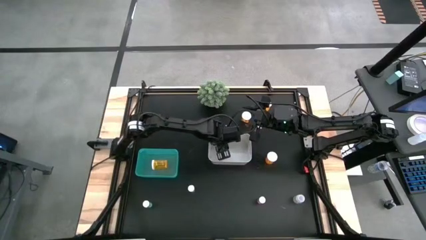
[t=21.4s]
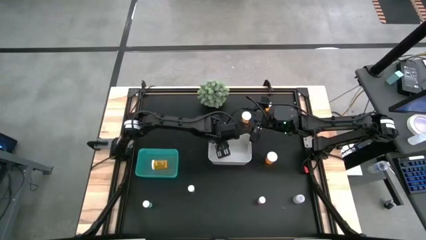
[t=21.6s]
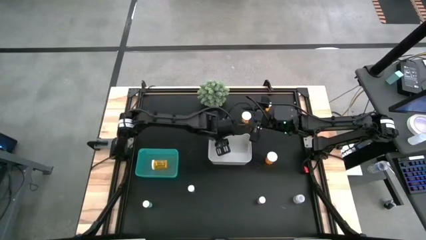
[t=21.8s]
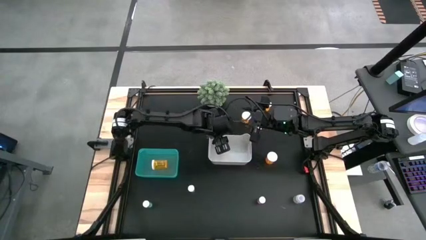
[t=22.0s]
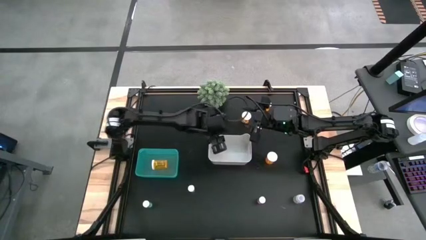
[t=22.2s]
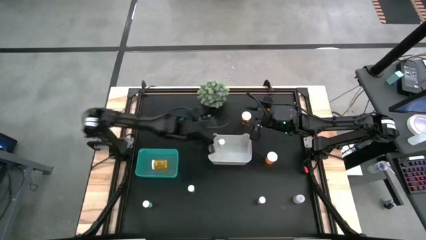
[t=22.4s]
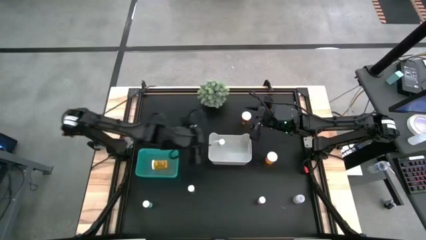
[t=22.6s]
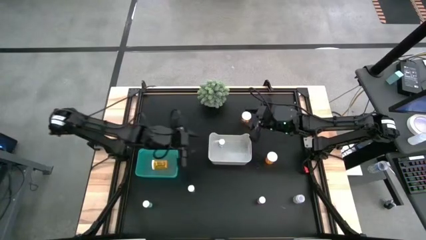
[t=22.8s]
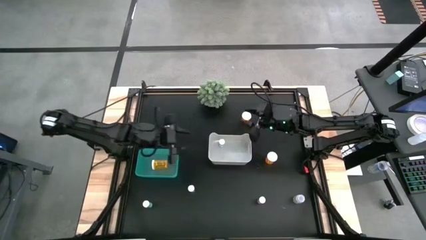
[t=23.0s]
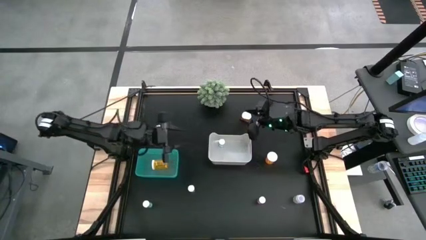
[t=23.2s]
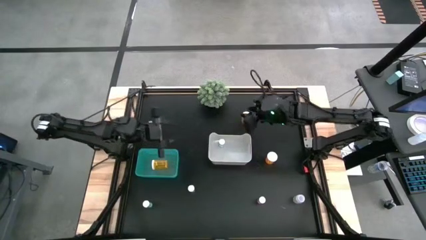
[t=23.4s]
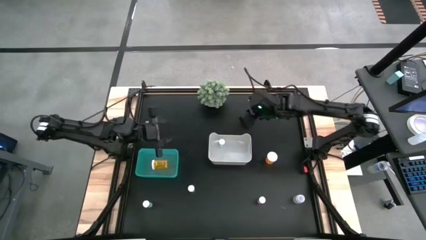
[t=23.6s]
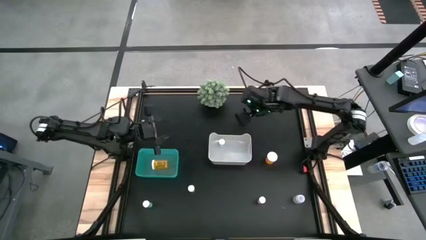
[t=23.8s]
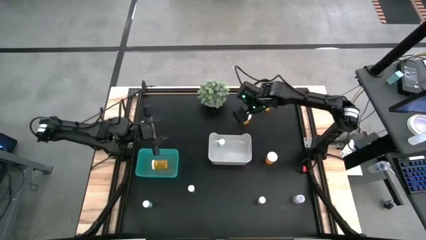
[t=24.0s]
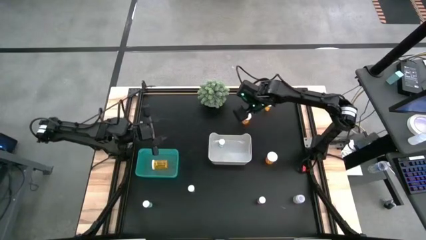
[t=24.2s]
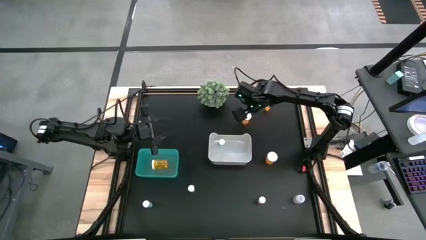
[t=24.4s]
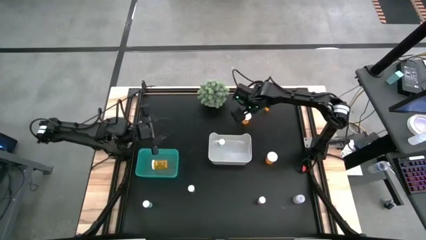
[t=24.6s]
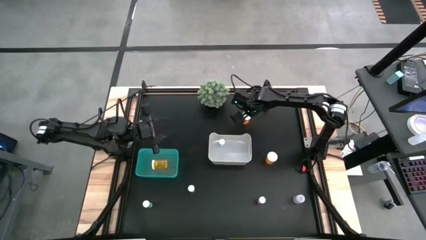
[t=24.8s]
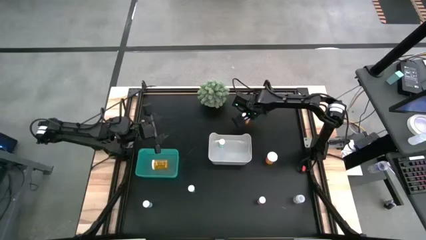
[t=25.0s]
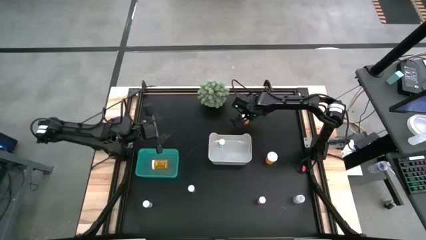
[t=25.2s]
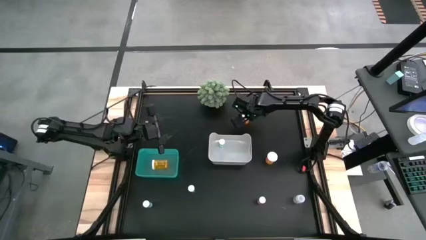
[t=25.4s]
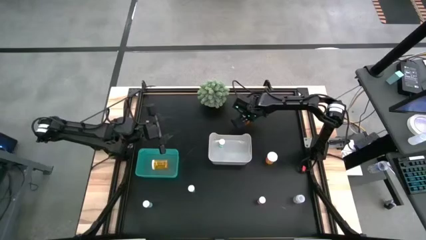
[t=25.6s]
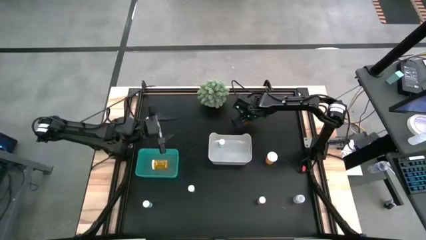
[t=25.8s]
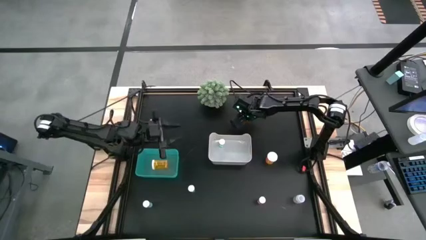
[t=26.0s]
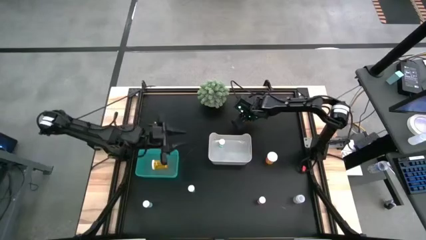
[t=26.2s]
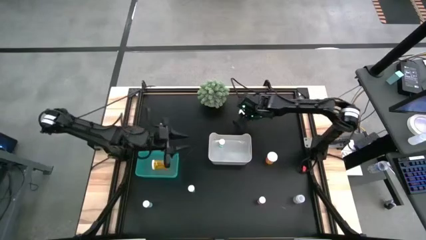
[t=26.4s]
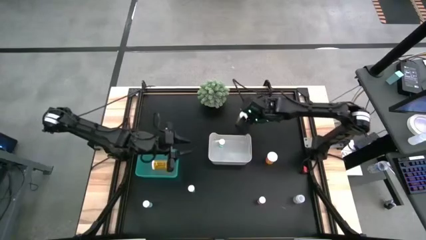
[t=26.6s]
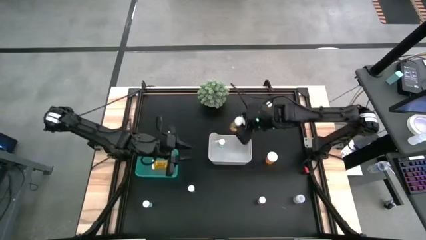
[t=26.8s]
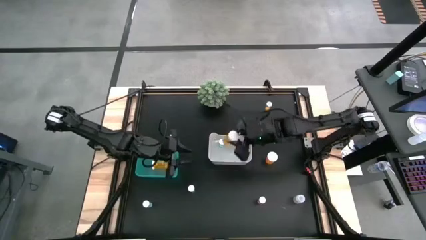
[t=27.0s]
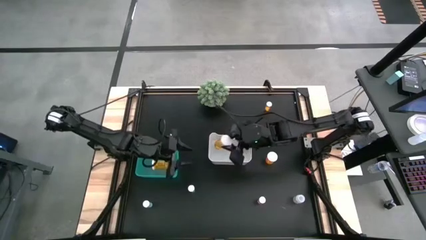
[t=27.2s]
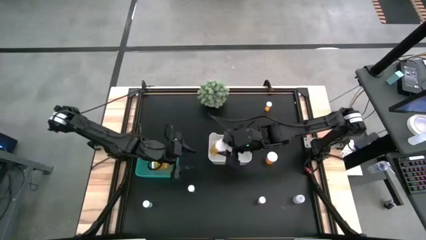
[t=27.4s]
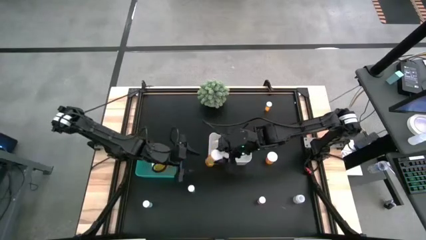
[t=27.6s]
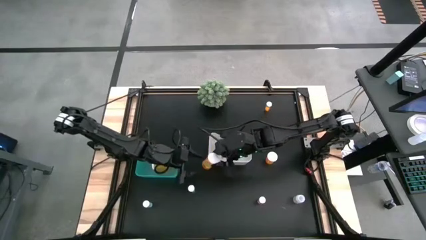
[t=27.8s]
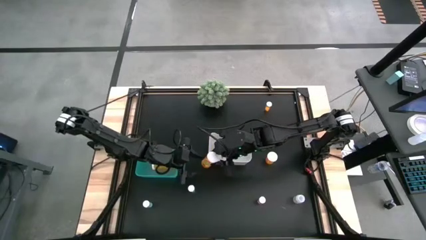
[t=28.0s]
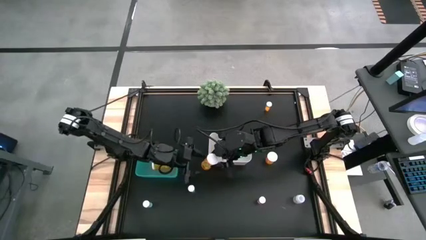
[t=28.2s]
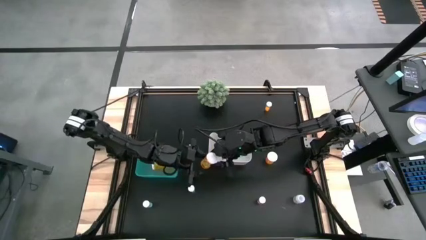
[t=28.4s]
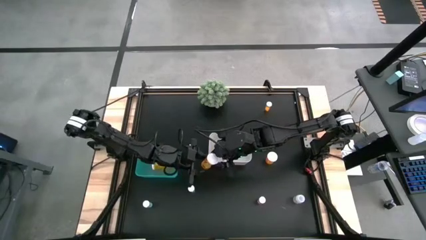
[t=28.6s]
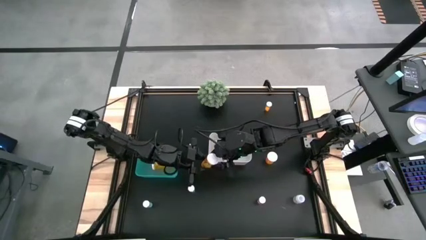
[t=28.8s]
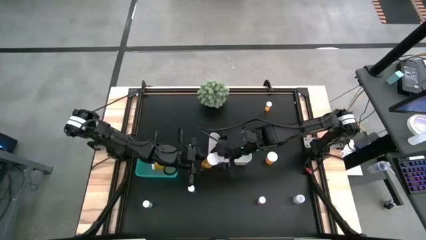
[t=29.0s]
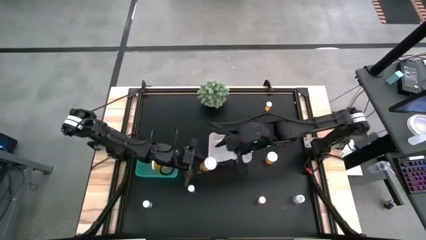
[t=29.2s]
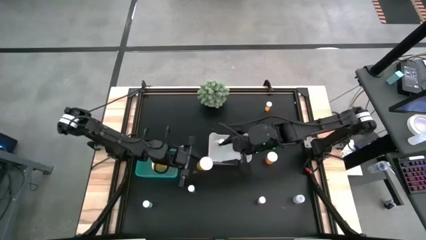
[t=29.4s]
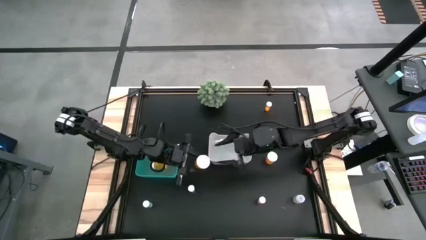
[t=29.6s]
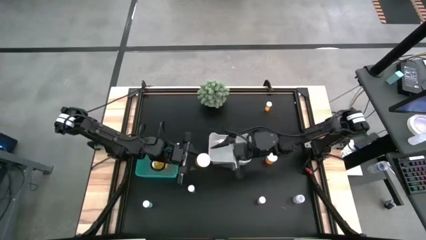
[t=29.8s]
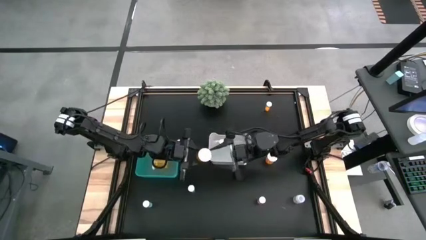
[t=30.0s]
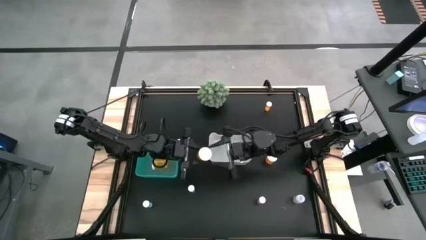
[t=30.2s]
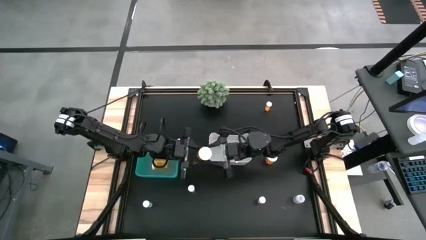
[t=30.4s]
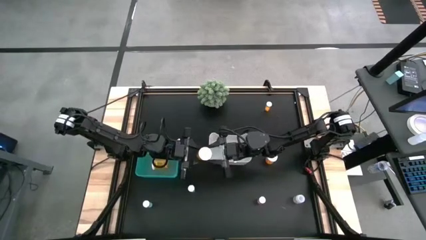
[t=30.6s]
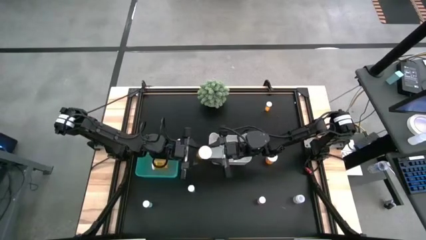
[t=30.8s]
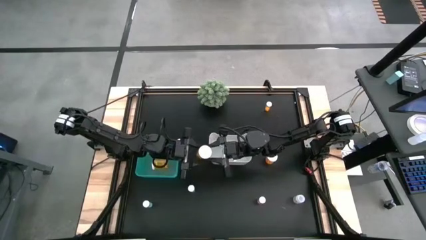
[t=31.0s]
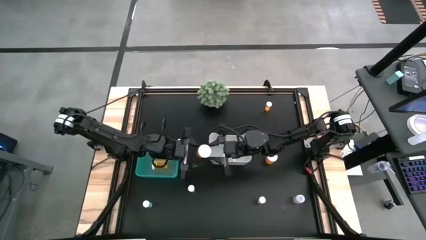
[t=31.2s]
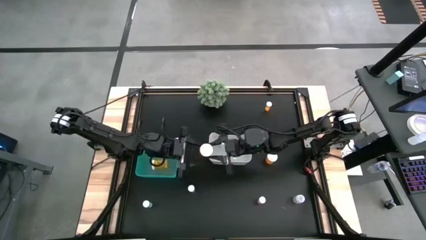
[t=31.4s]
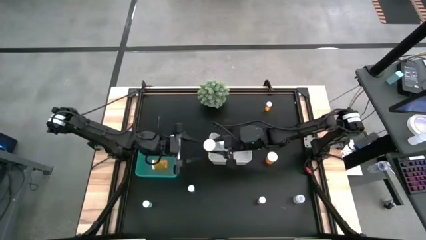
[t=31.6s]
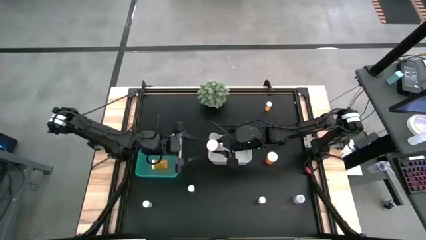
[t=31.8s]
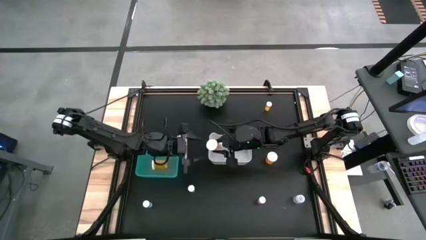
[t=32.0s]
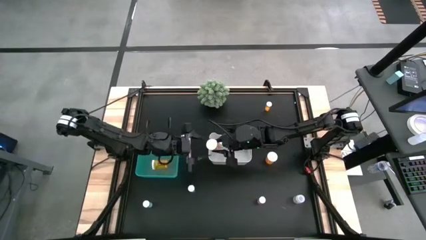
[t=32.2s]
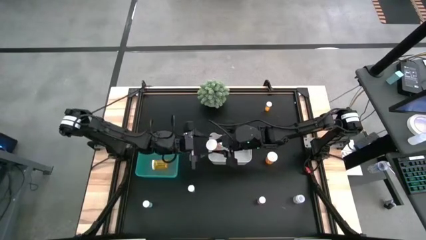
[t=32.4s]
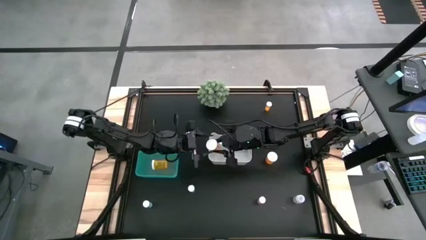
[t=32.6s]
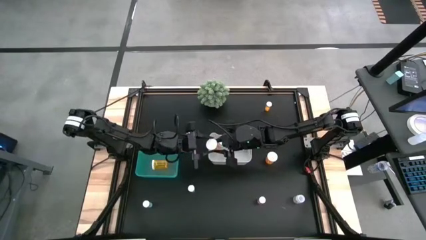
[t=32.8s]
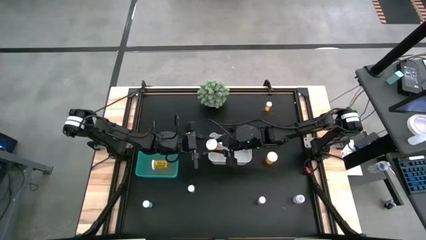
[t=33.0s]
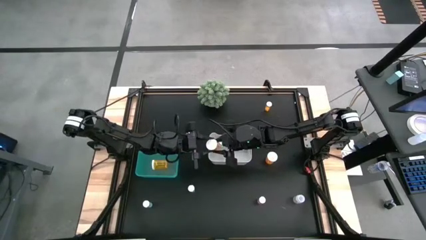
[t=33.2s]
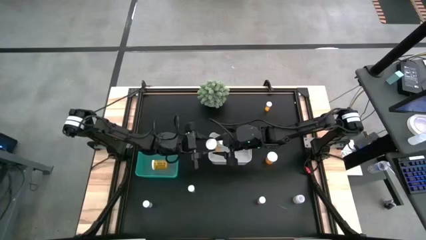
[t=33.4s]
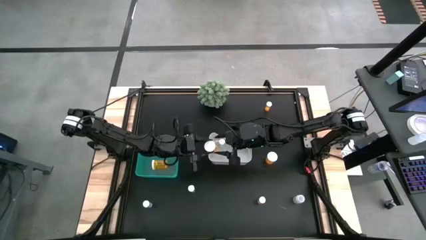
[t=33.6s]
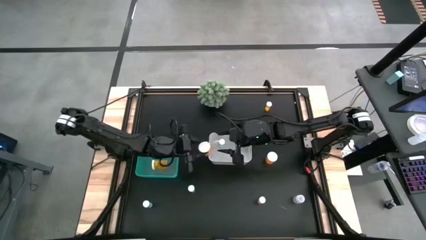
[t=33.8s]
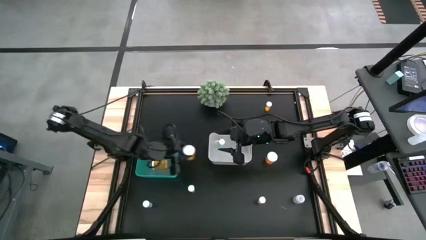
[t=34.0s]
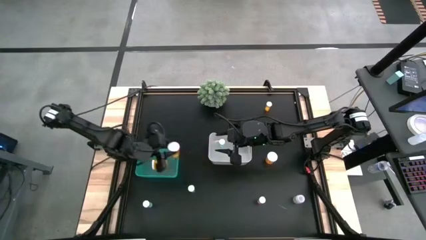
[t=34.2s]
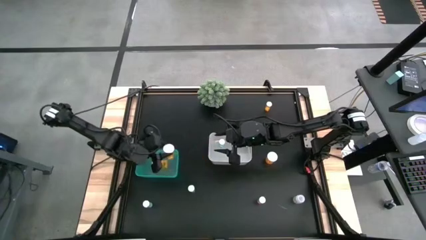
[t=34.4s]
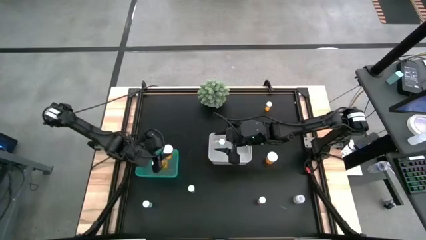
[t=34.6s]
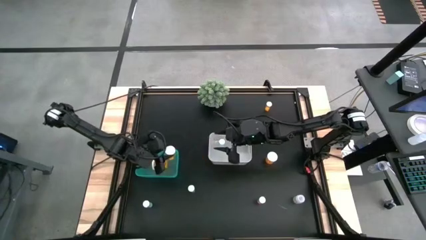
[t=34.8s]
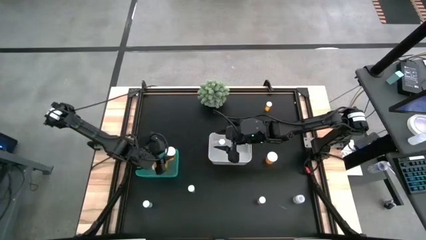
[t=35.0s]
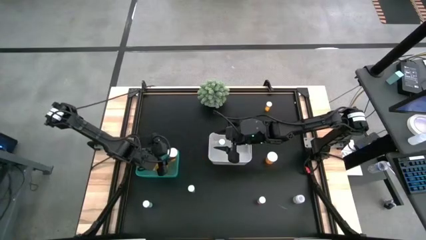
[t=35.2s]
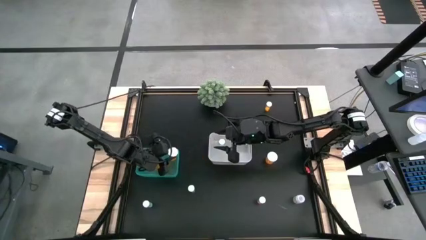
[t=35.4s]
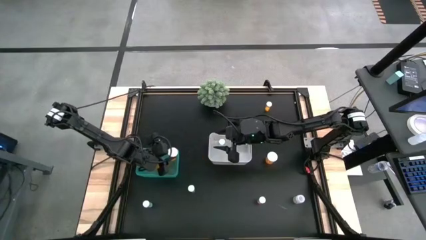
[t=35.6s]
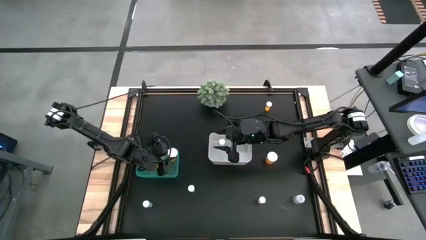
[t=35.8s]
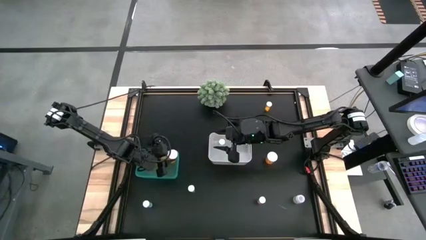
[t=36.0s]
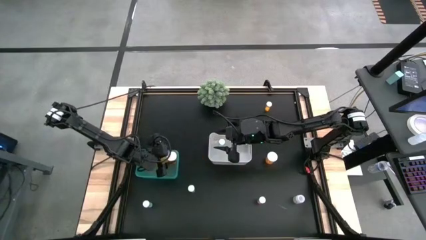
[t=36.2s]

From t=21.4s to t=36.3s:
Task: Pick and place medicine bottles into bin by pill shape (circle, oval)
Put the orange capsule bottle into the blue bin

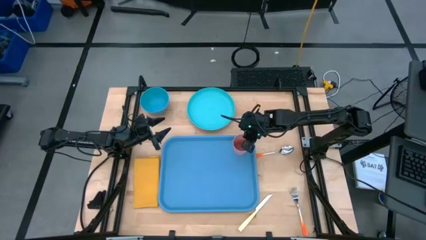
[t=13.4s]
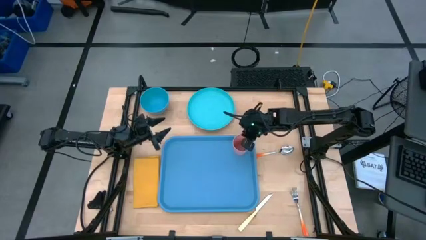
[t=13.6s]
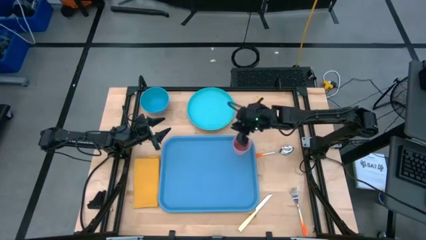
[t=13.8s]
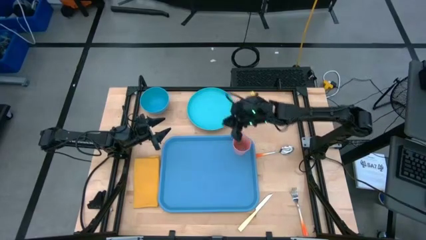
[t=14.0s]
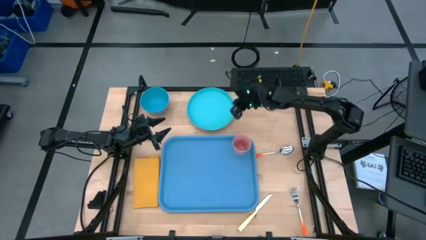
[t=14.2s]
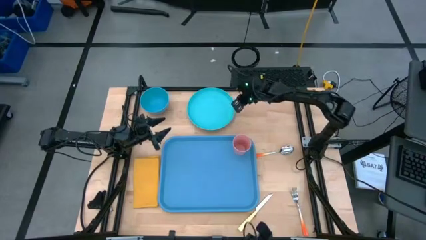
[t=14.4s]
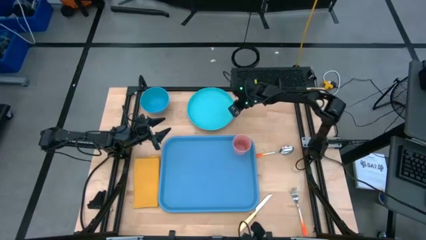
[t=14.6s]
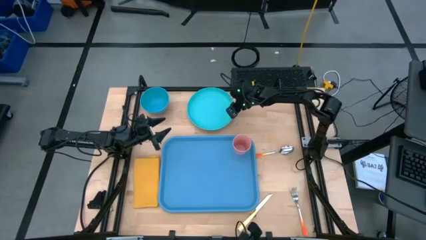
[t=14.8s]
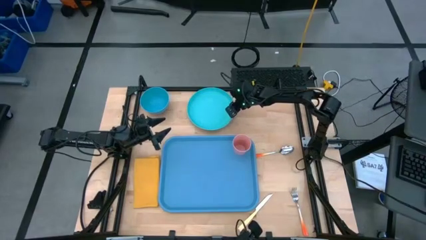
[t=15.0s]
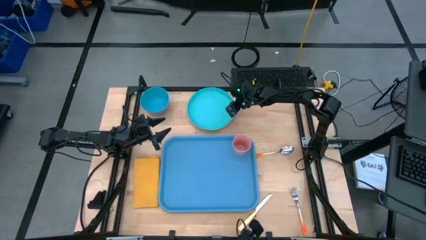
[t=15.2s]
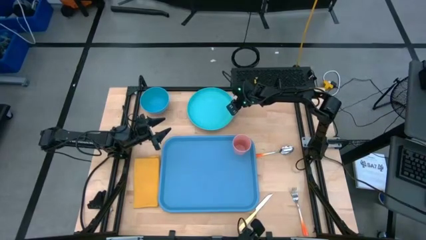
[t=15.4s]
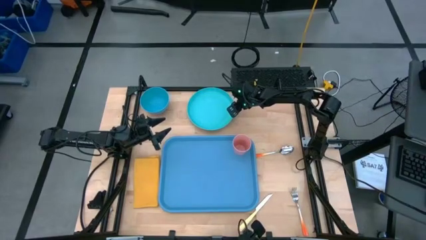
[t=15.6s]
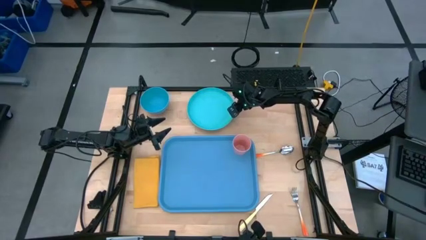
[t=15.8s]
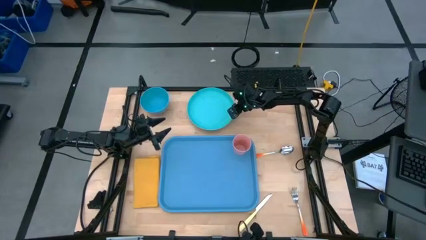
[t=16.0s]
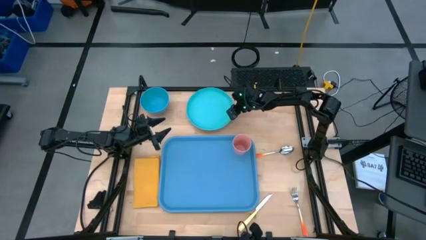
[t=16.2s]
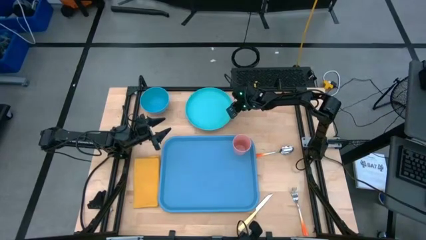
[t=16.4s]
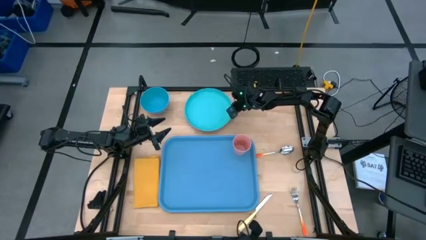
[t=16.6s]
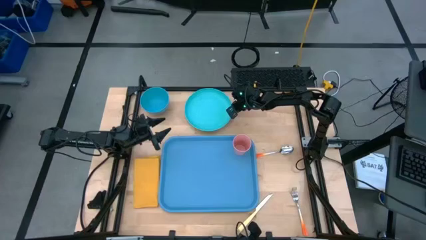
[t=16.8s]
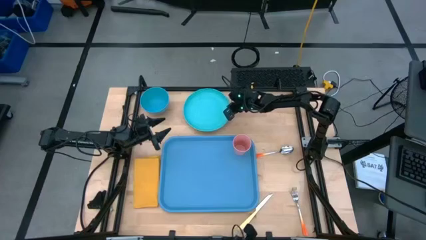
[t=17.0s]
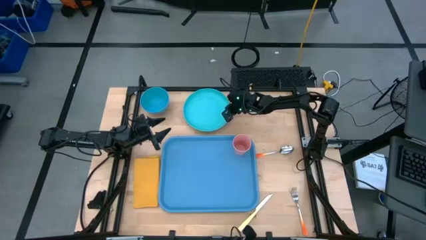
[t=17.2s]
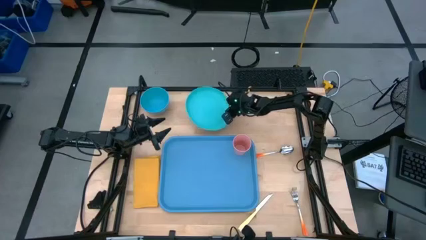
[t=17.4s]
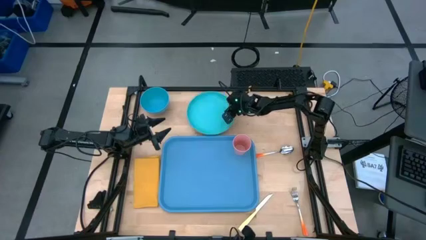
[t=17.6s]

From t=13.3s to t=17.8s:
Task: Set up tray
Put the blue plate under the pink cup on the blue serving tray
